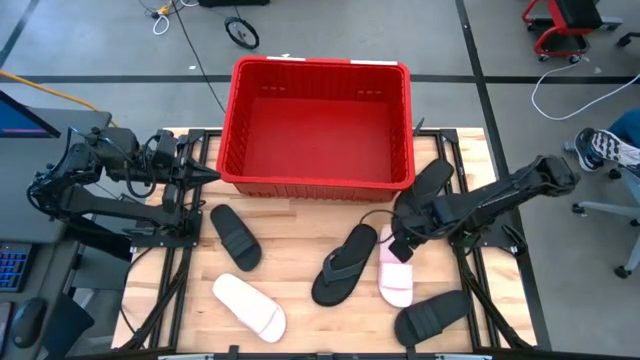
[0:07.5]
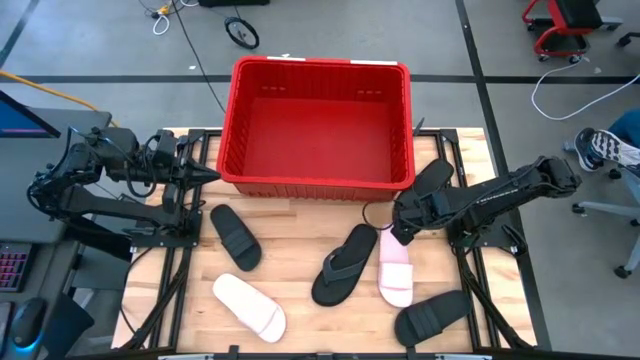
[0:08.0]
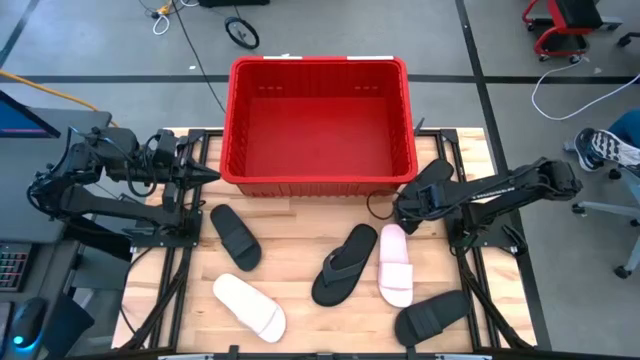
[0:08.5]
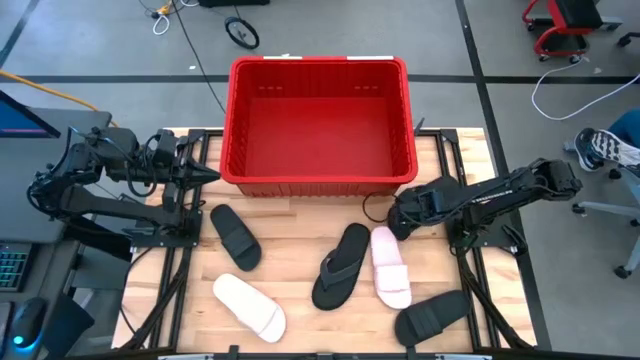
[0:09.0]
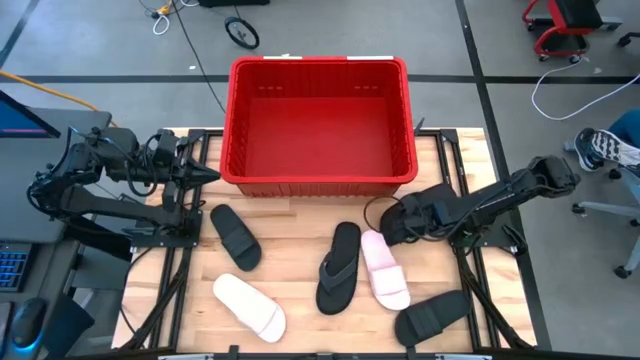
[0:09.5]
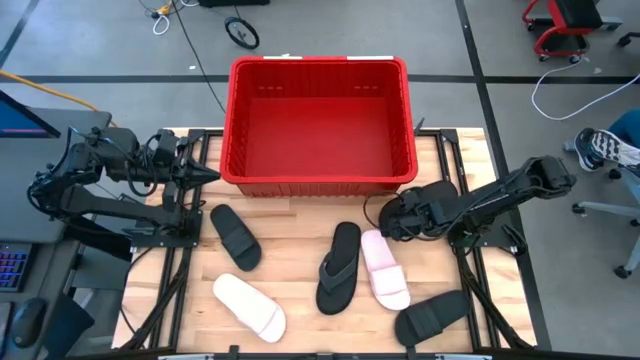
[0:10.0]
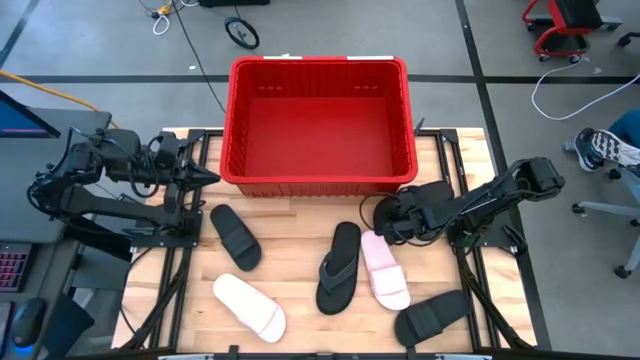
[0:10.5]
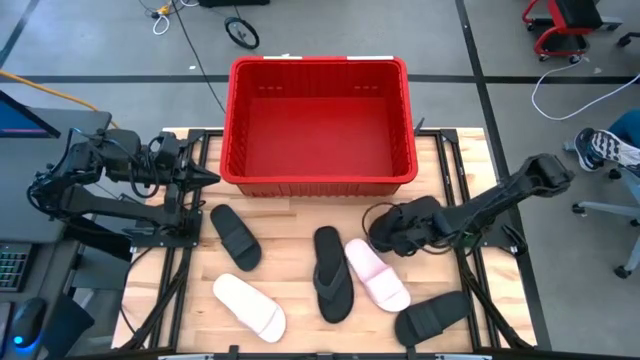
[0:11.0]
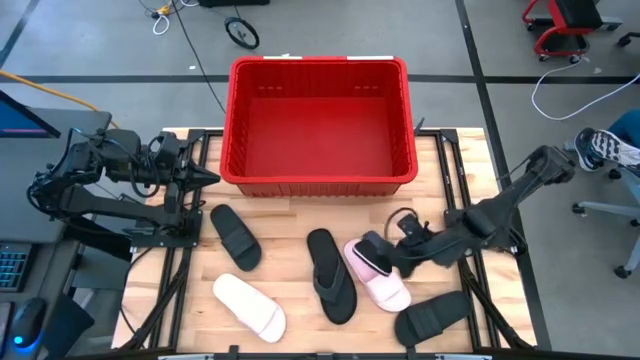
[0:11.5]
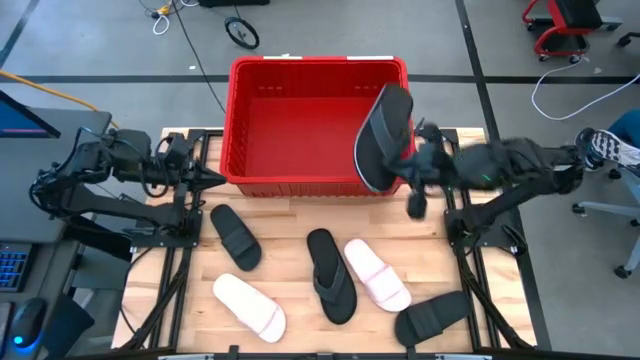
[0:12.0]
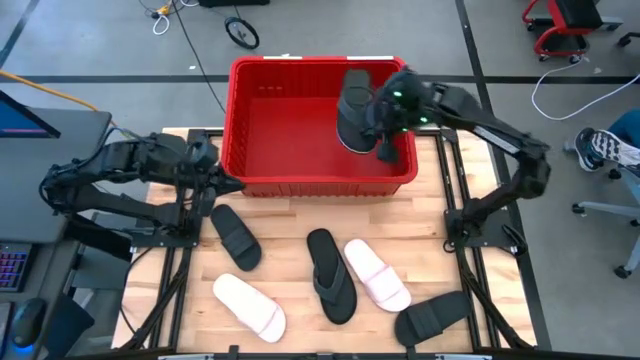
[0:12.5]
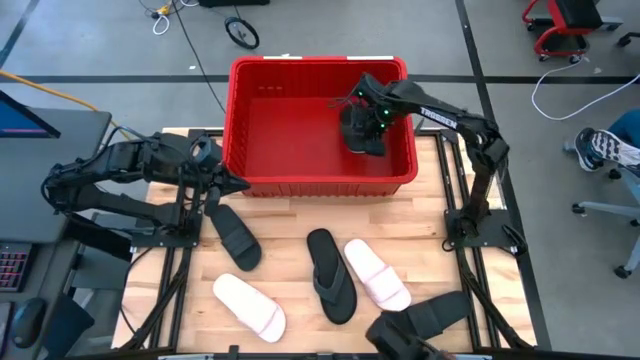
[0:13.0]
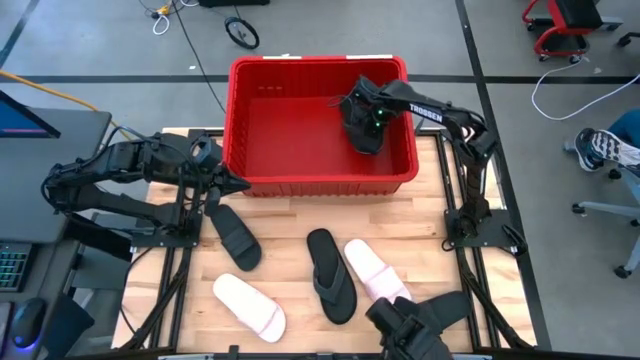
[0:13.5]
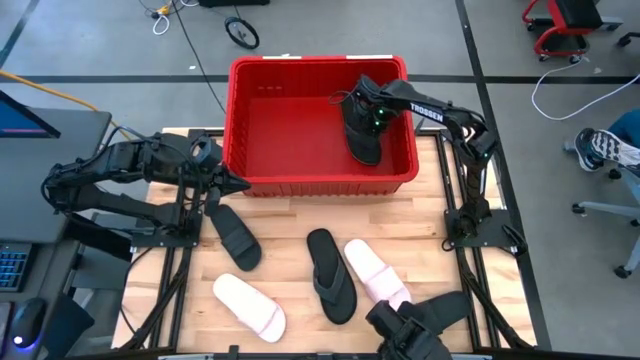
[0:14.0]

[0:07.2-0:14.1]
Task: Pick and place slides into bin
Put the top black slipper into the red container

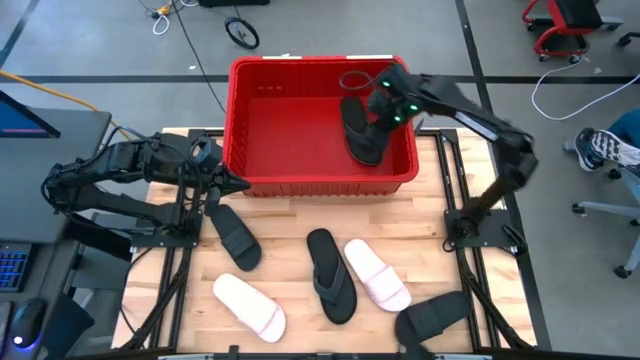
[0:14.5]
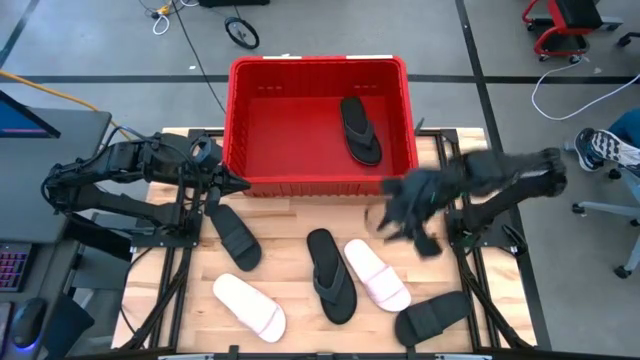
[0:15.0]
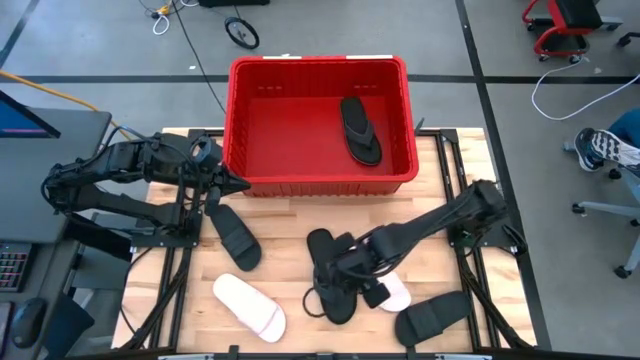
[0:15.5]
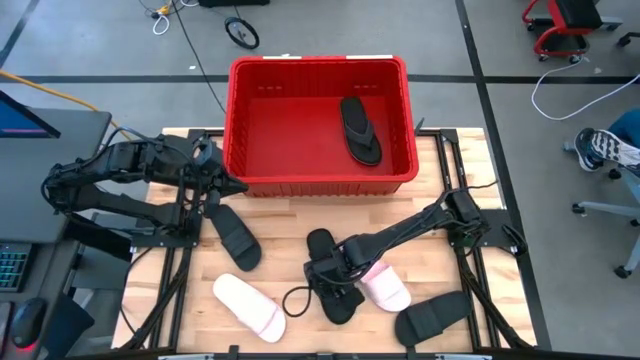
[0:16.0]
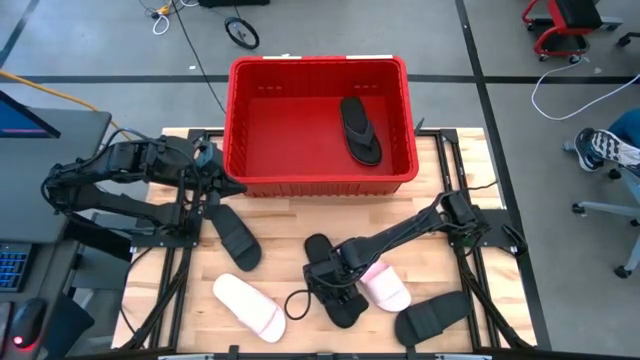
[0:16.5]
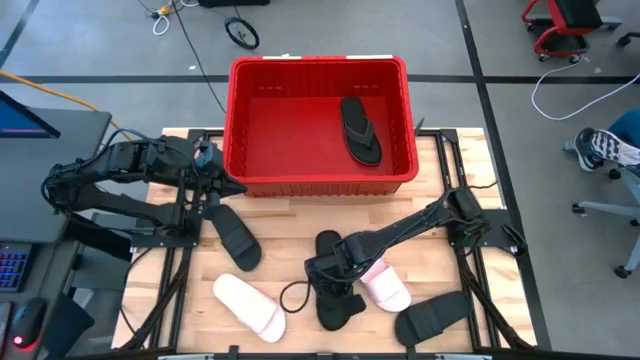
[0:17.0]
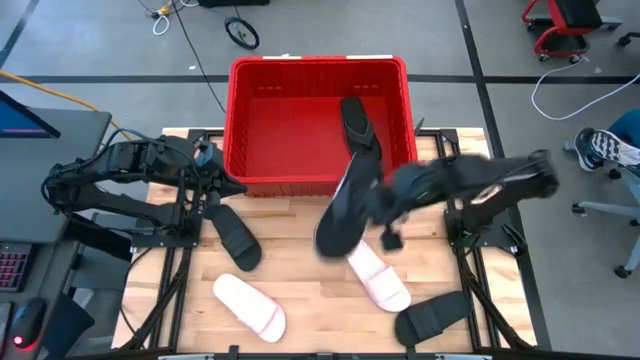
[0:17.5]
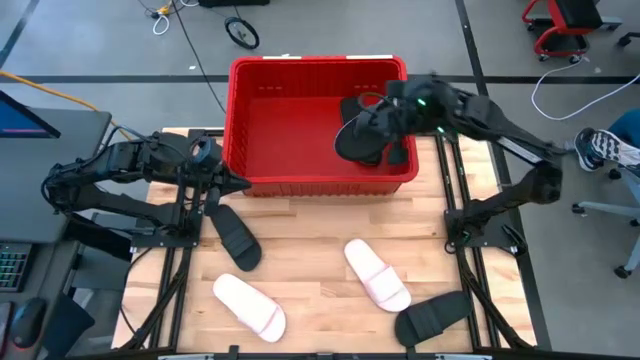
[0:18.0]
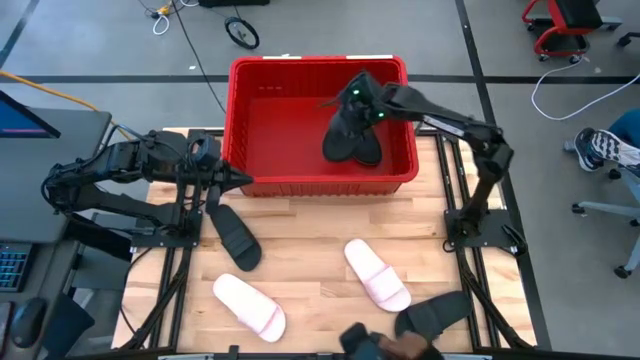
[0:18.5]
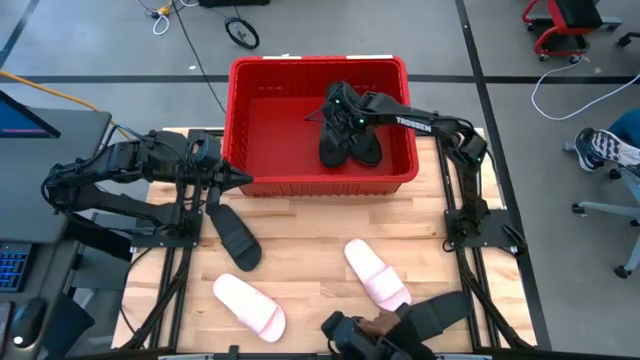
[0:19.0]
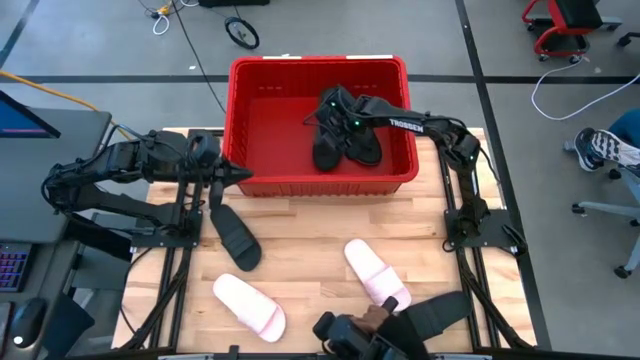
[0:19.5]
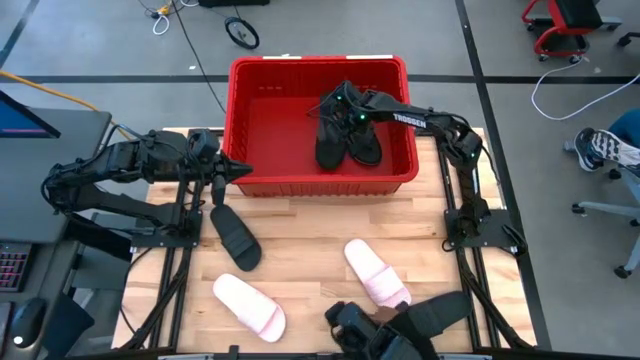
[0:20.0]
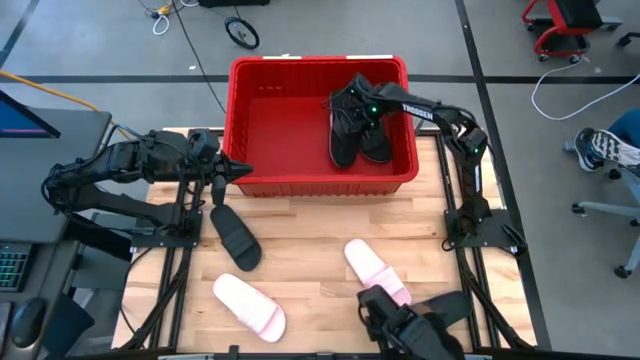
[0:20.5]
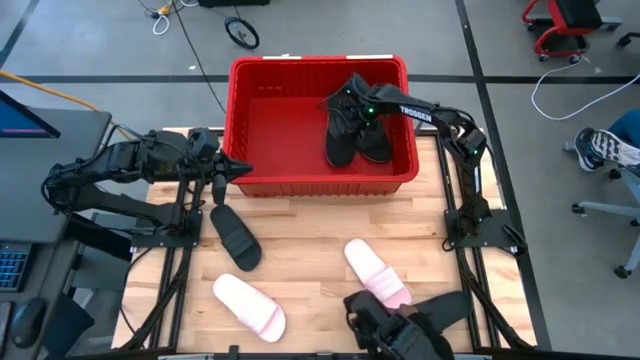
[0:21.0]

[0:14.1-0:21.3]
Put the black slipper into the red container

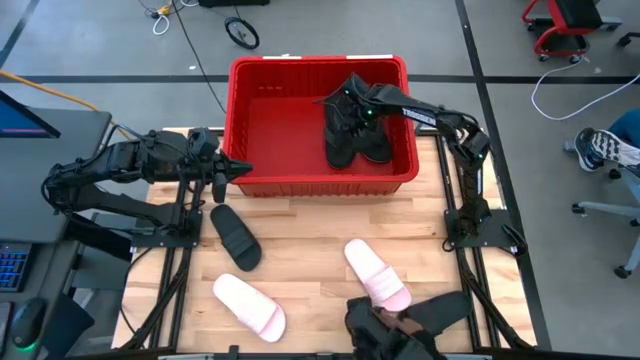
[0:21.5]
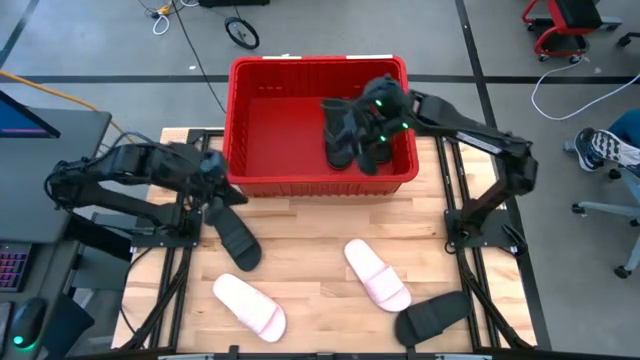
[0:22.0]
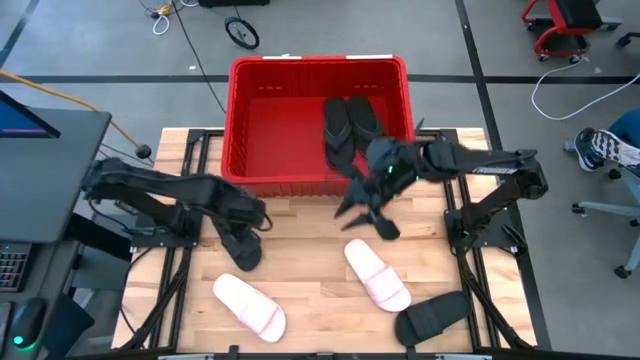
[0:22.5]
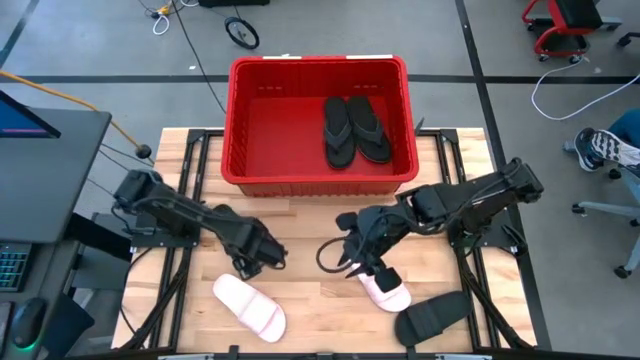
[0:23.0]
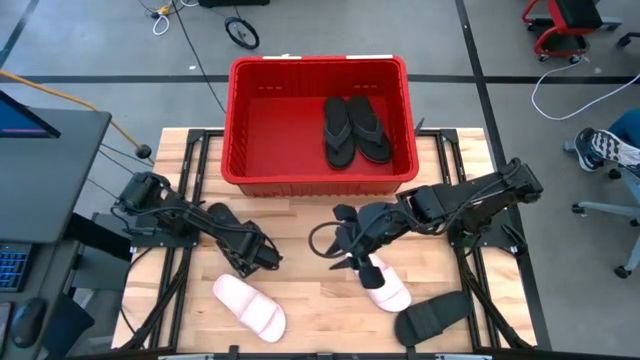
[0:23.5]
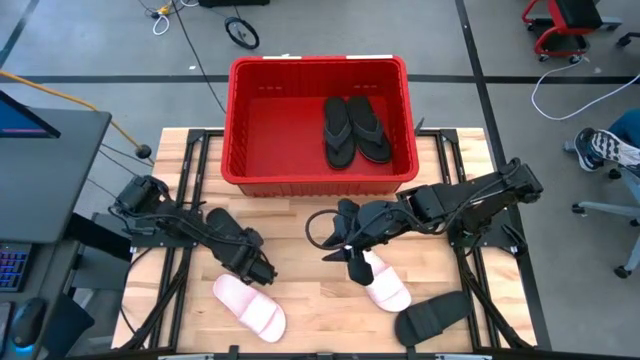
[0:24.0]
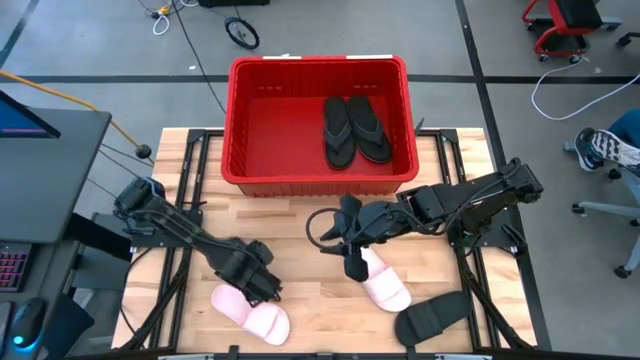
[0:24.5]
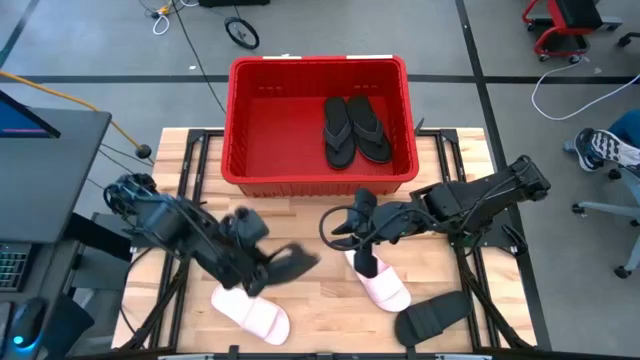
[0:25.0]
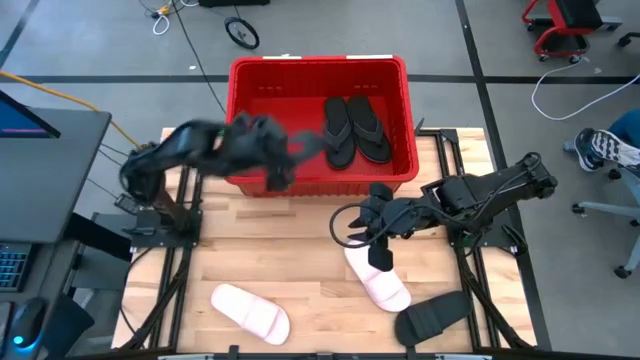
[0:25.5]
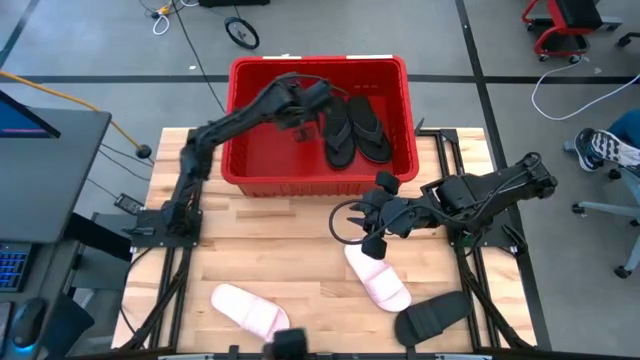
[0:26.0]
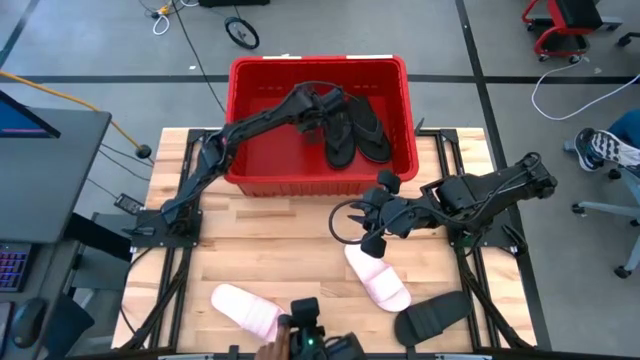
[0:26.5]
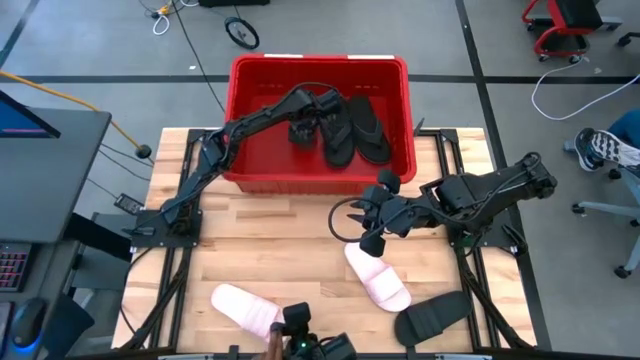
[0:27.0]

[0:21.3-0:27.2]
Put the top black slide into the red container

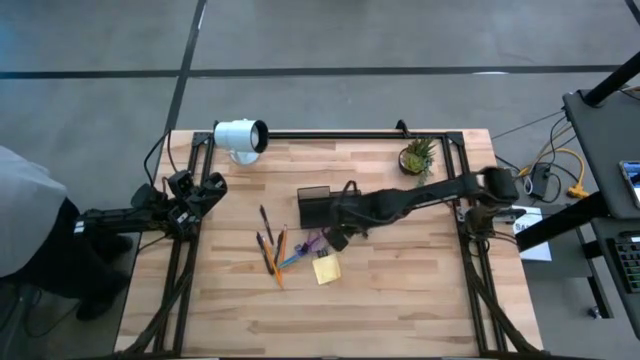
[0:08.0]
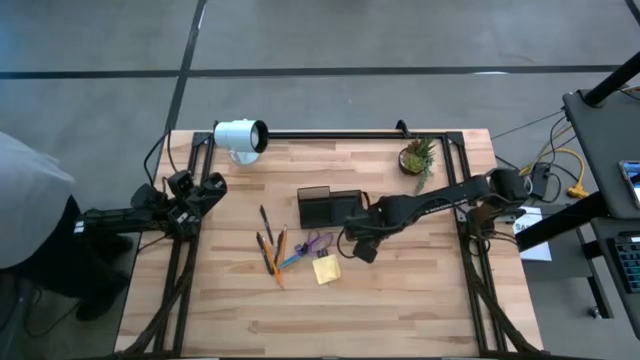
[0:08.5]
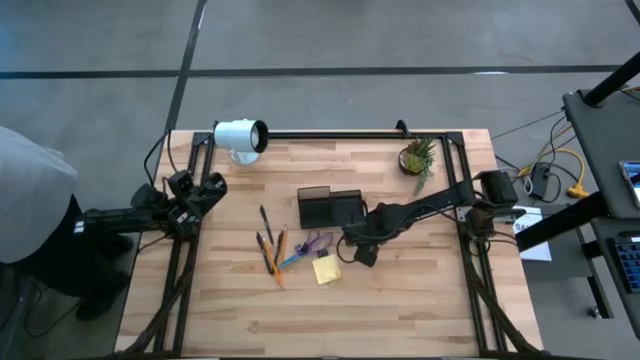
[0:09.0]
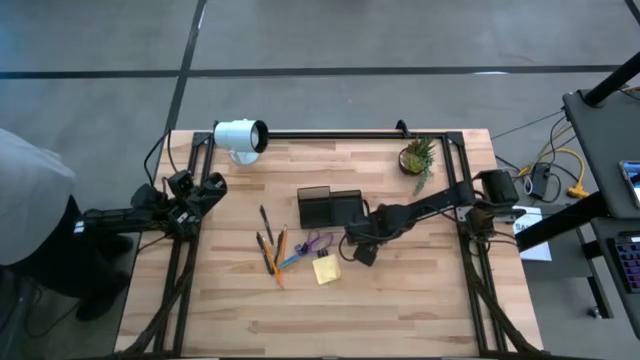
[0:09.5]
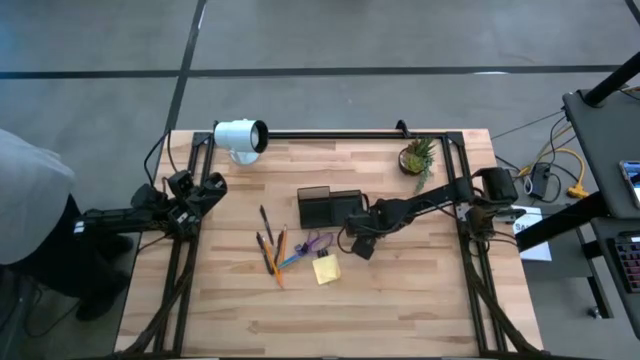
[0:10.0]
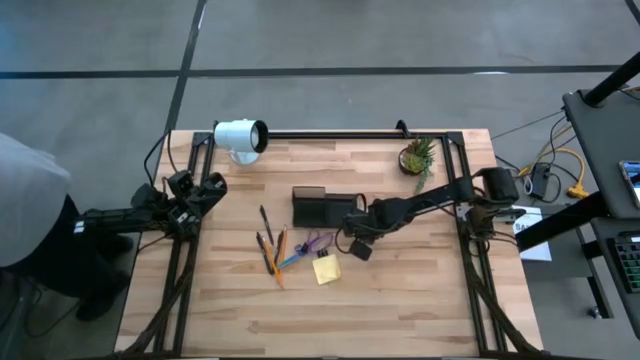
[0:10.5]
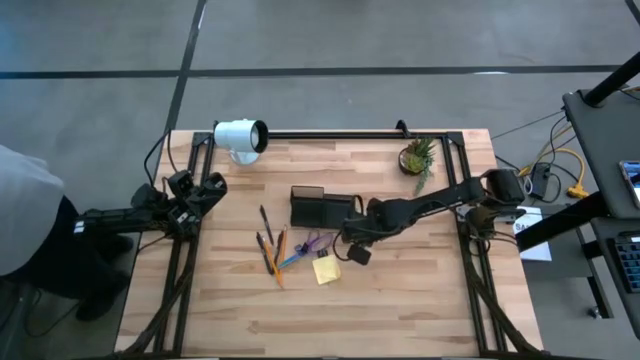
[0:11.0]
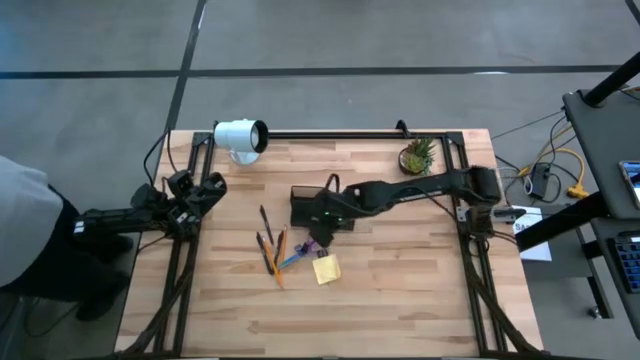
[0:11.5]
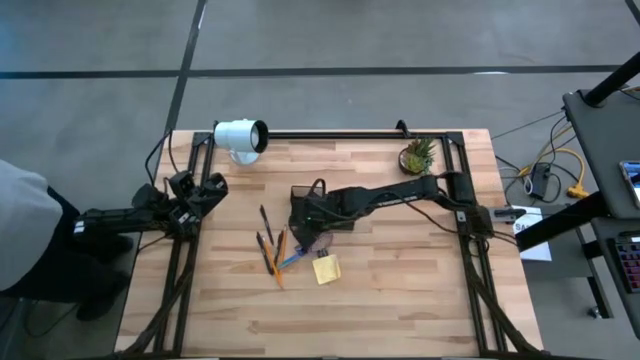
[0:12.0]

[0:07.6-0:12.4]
Task: Pick and place office supplies into organizer
Put the right black binder clip into the black desk organizer
